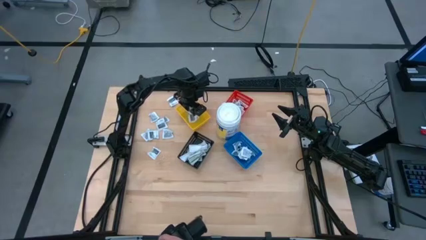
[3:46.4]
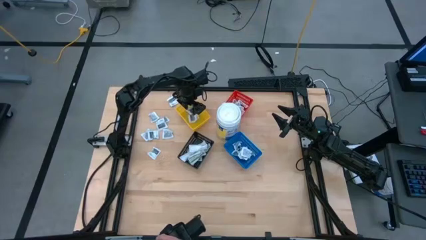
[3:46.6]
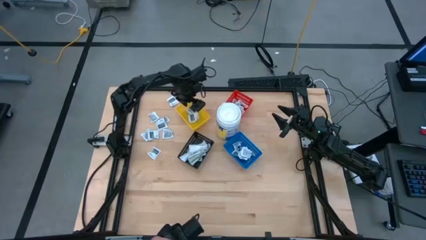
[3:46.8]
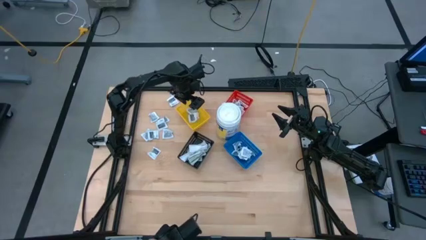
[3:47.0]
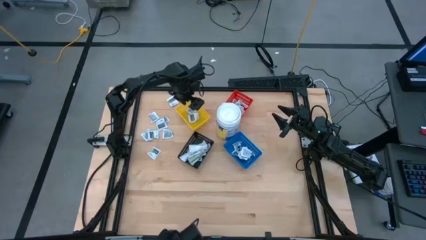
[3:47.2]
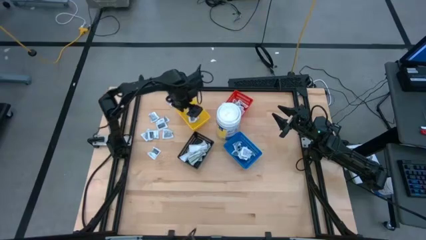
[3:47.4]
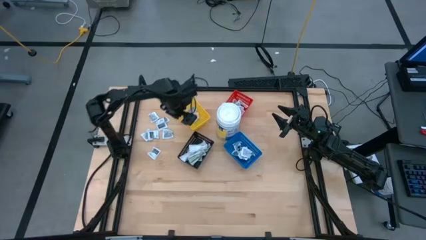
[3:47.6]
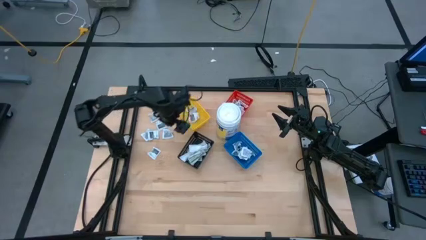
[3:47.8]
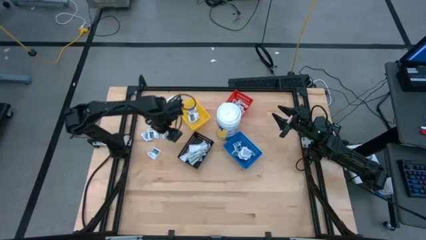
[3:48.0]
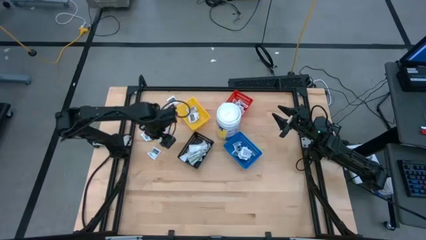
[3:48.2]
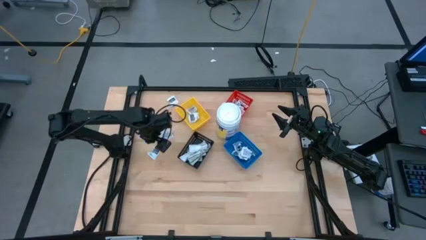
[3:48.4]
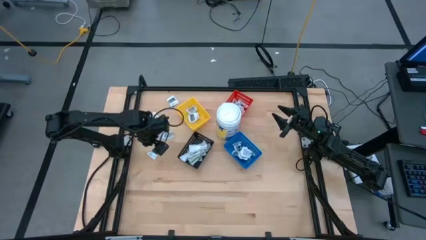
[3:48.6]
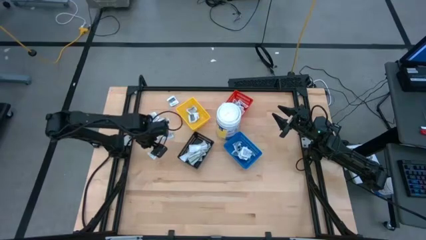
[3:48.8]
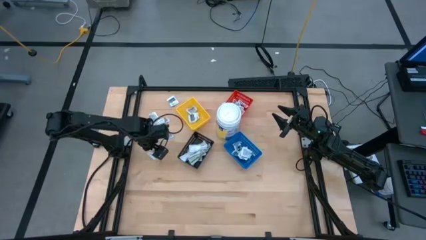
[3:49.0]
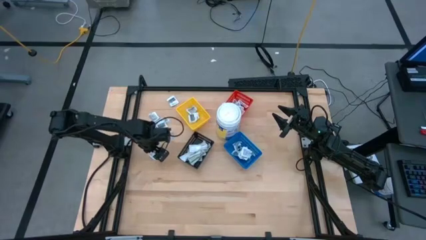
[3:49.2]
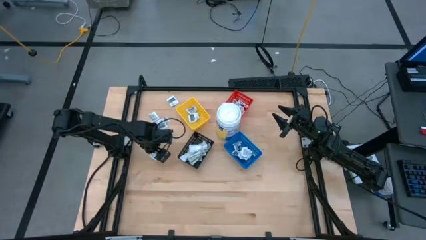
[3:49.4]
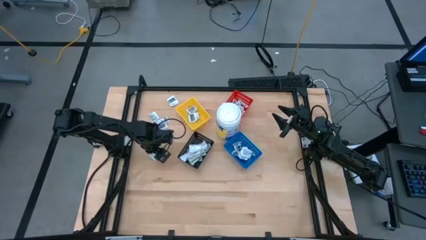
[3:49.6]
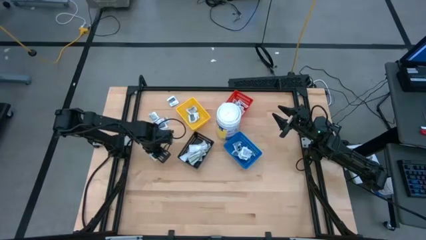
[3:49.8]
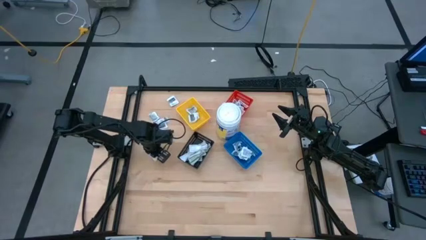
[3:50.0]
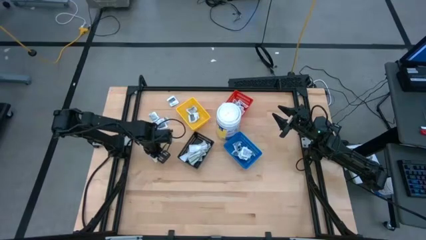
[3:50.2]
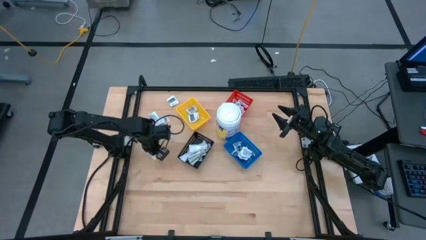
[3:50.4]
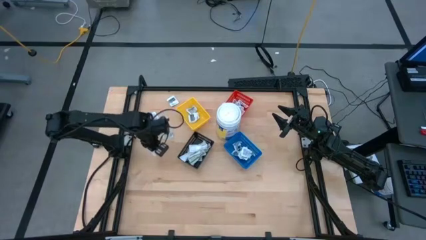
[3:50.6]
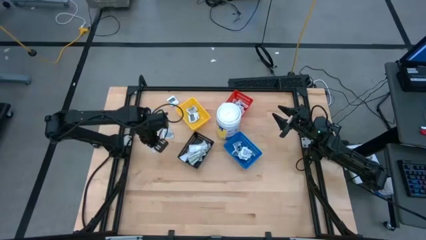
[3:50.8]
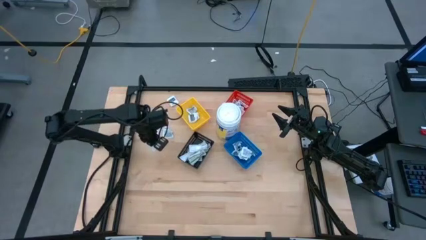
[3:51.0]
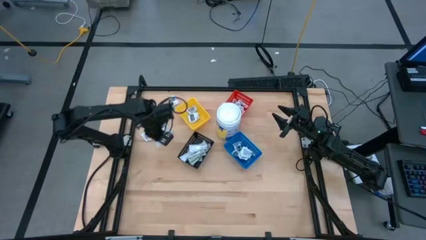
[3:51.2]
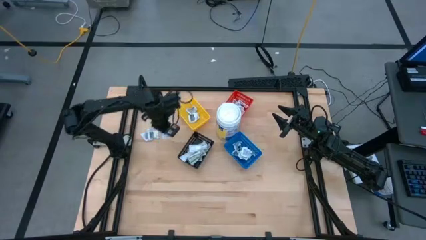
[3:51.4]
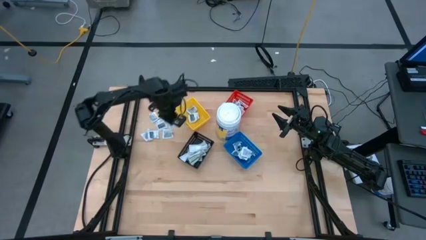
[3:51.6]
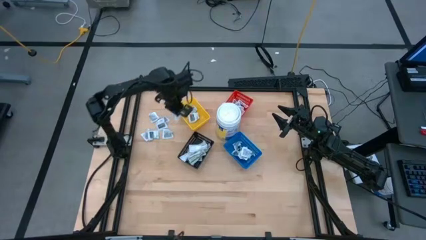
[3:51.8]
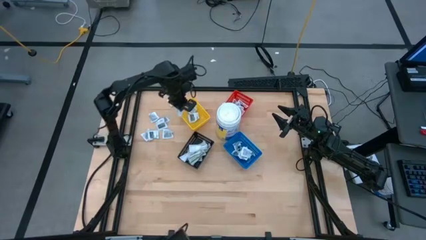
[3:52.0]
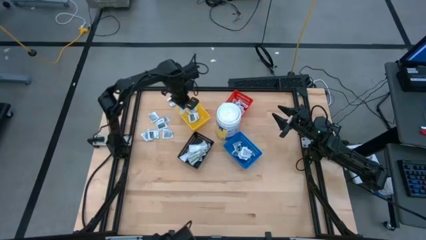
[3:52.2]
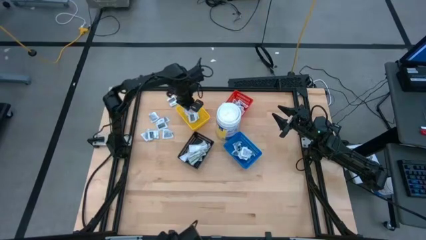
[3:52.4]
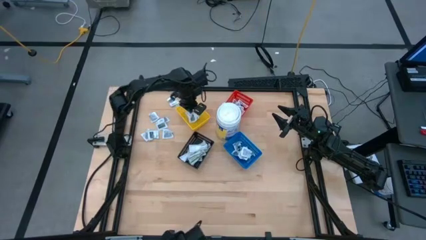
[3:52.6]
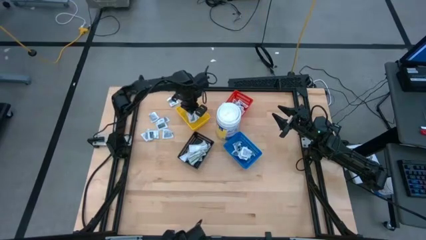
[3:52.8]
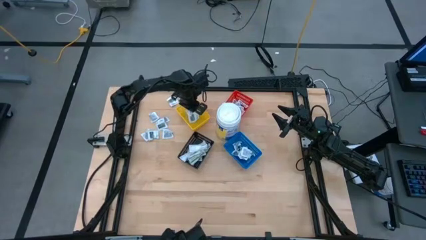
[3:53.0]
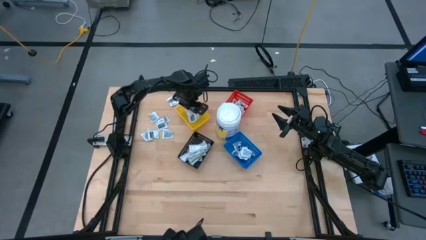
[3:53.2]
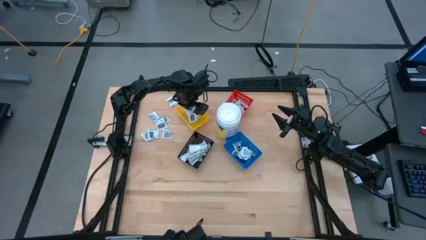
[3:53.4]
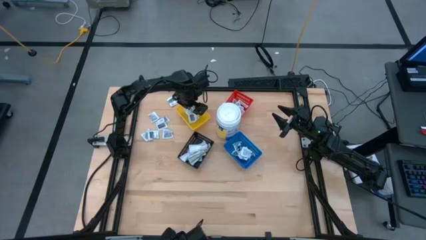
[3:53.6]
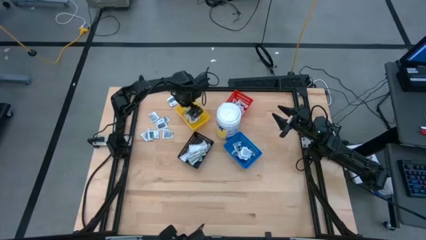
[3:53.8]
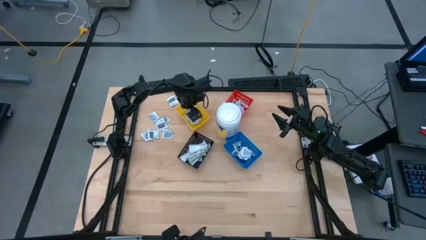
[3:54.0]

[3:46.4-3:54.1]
Task: Pick & Place First Aid Supplies
Put the towelette pack into the yellow bin

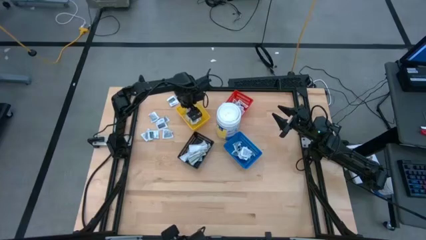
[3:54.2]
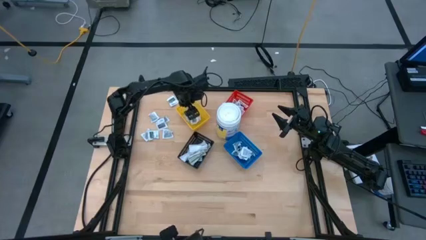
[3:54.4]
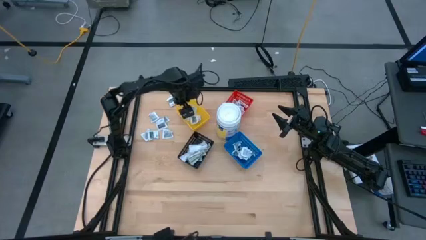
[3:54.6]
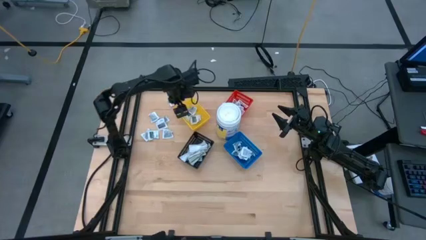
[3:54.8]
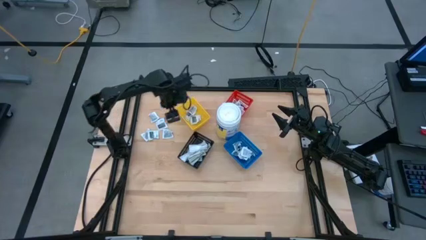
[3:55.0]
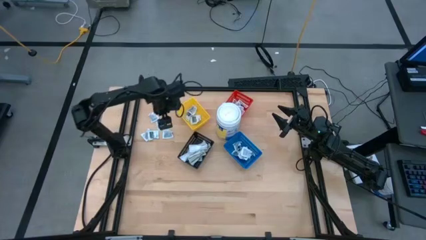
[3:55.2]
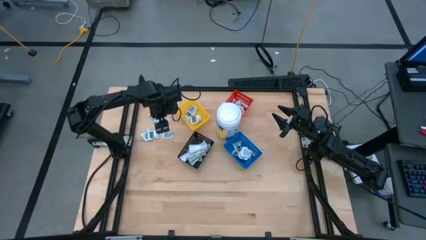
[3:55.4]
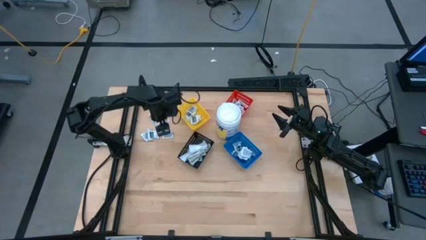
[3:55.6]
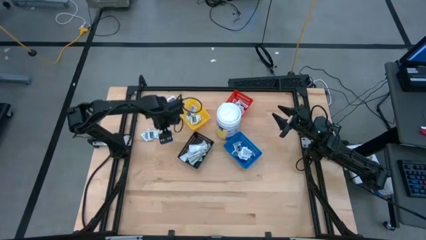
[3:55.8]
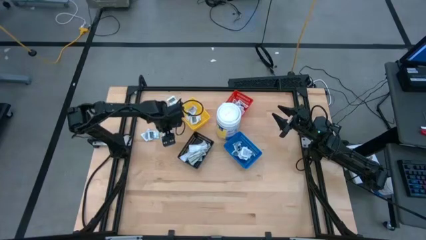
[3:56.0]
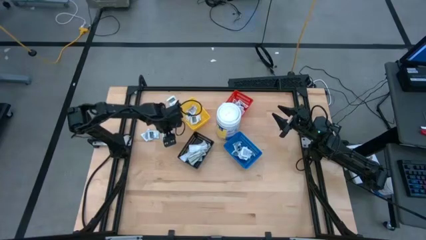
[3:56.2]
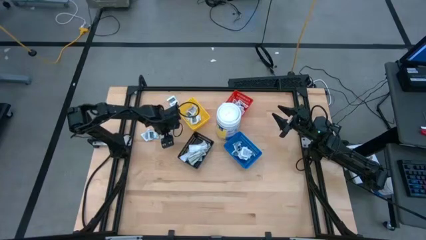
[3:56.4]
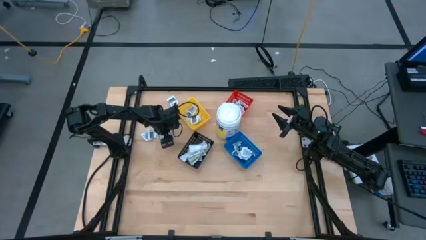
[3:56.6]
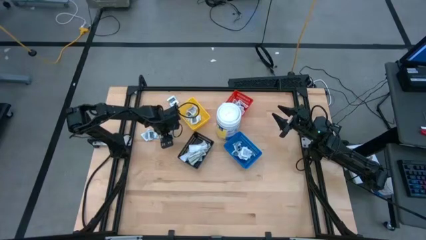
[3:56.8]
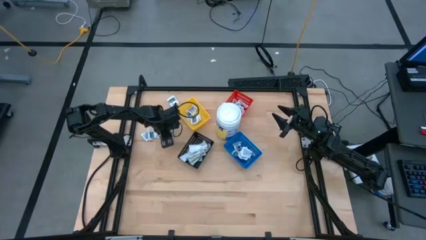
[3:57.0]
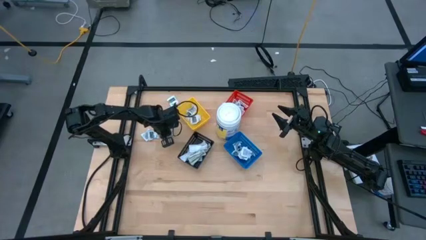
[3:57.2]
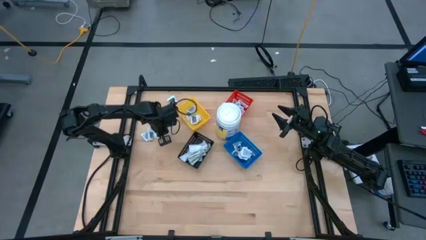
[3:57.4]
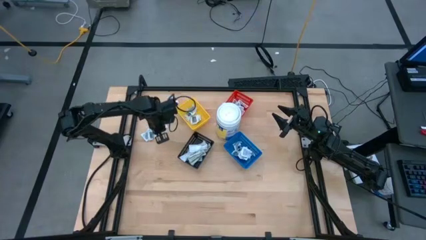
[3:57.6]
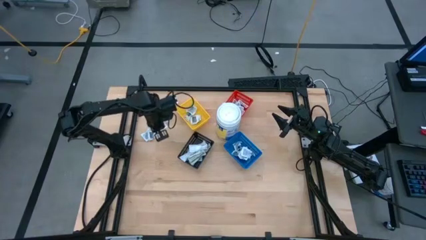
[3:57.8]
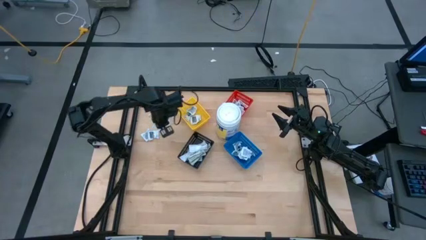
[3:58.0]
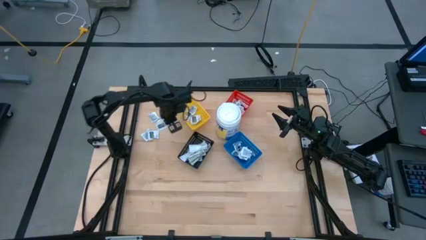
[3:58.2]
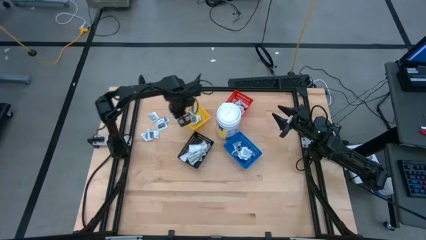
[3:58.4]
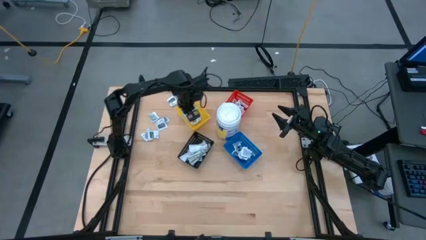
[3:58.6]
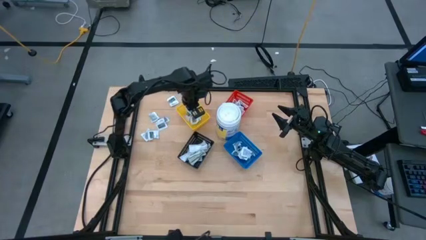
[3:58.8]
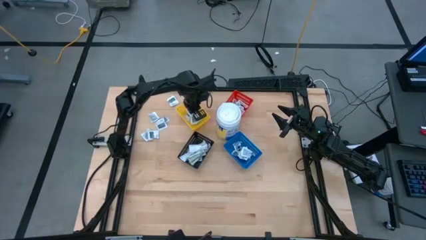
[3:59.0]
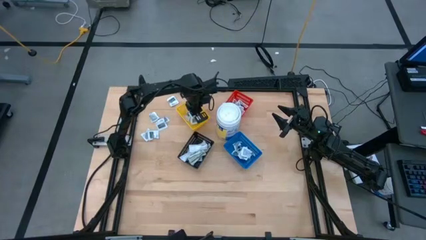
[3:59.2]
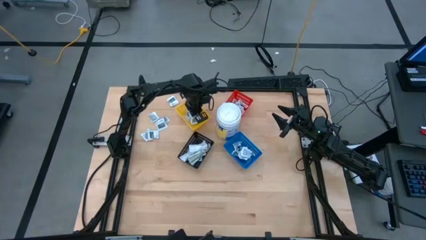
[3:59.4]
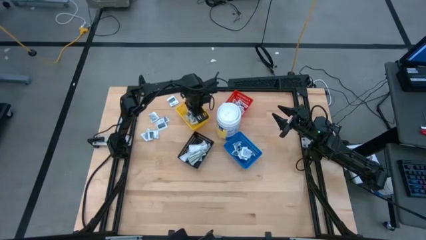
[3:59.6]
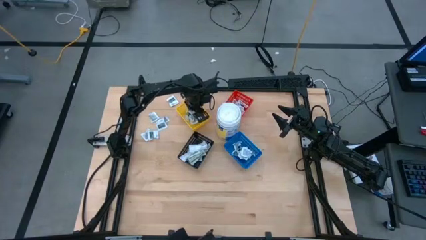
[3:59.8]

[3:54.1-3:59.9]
Put the towelette pack into the yellow bin

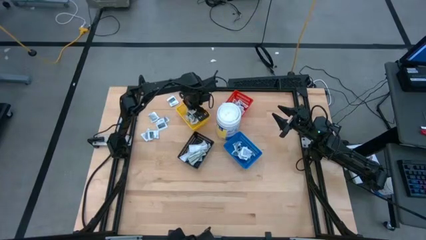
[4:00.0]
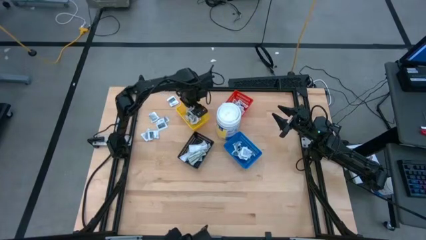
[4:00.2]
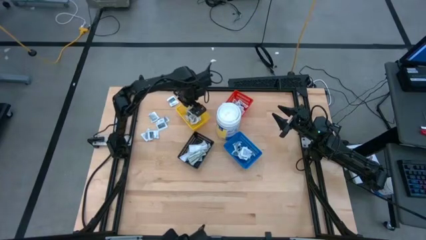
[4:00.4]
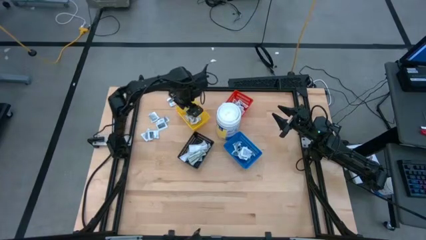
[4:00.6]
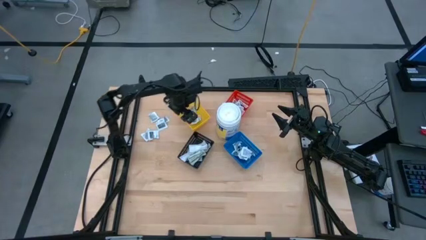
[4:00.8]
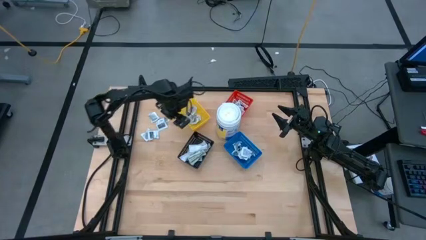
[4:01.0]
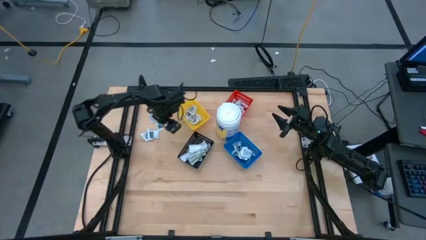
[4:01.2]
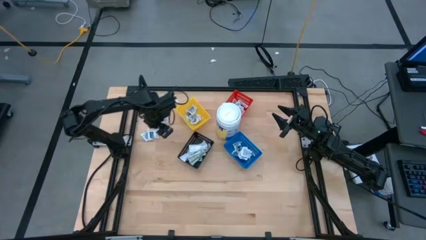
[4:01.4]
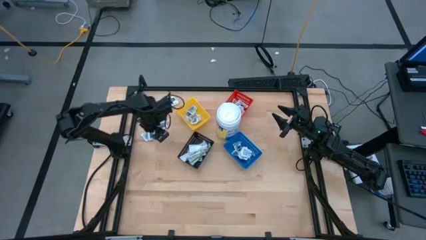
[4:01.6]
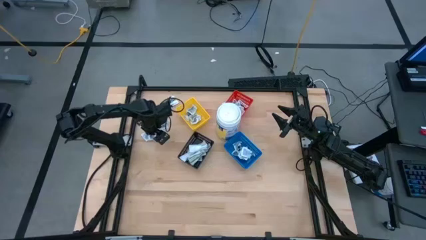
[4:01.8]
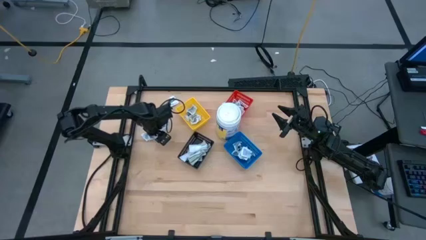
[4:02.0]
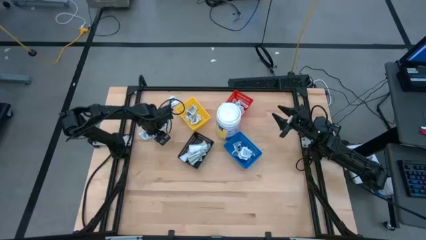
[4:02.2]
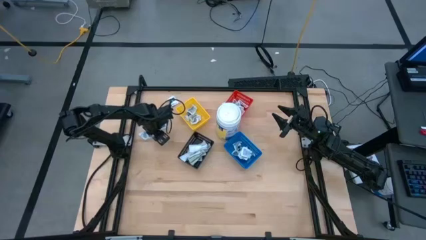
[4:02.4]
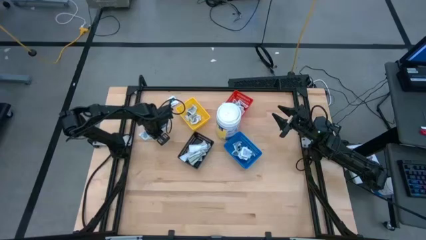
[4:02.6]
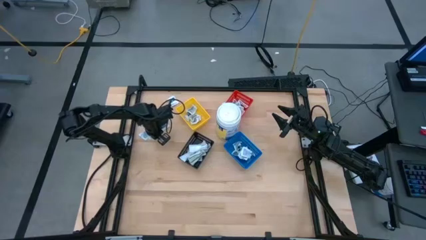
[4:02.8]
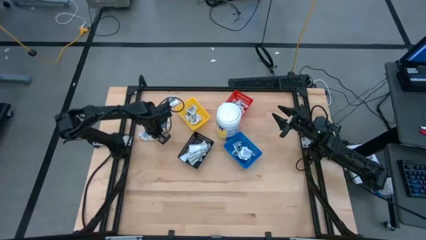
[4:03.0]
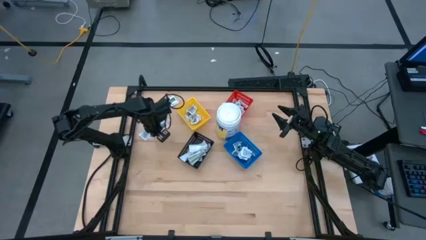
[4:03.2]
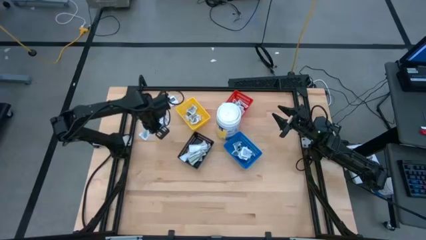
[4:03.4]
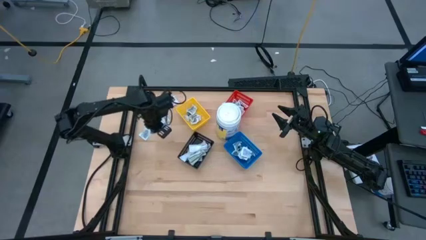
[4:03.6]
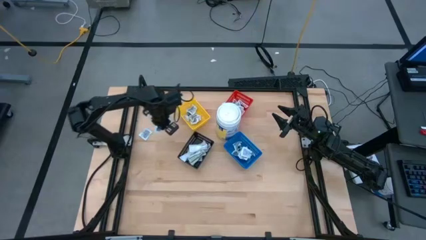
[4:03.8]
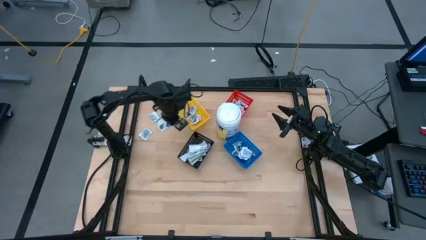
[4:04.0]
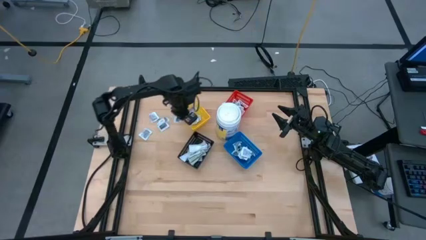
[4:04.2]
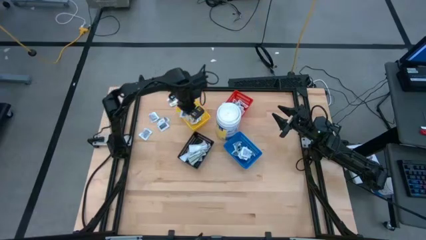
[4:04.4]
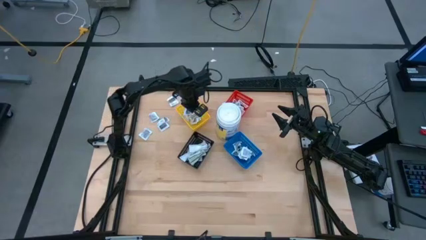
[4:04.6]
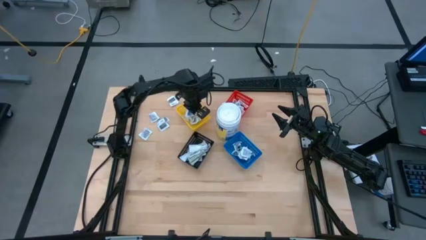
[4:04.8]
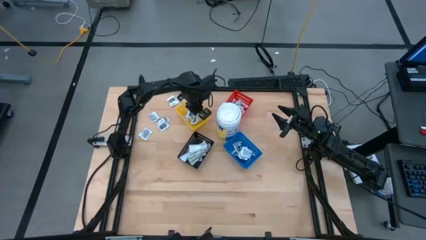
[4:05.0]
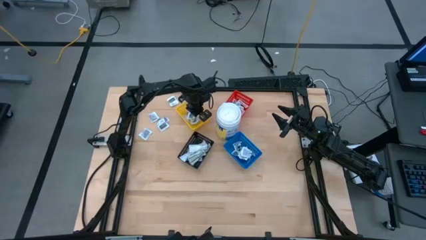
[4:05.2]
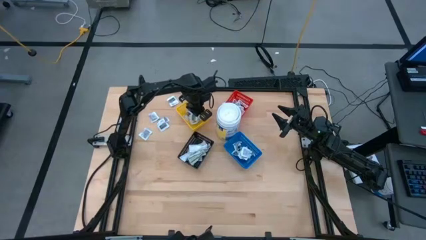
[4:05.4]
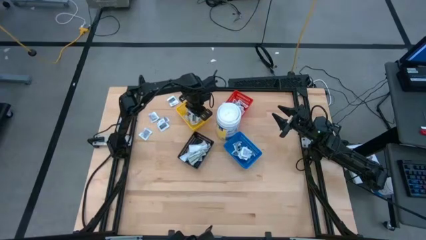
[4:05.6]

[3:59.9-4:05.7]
Put the towelette pack into the yellow bin
